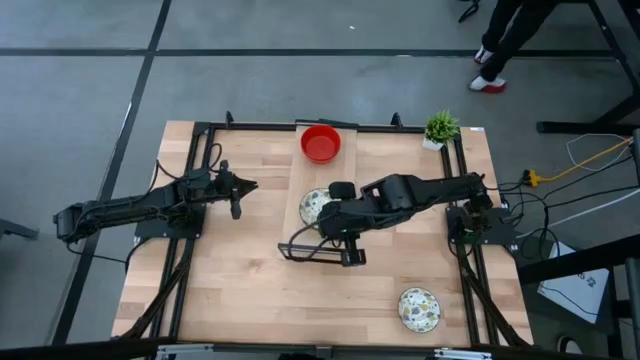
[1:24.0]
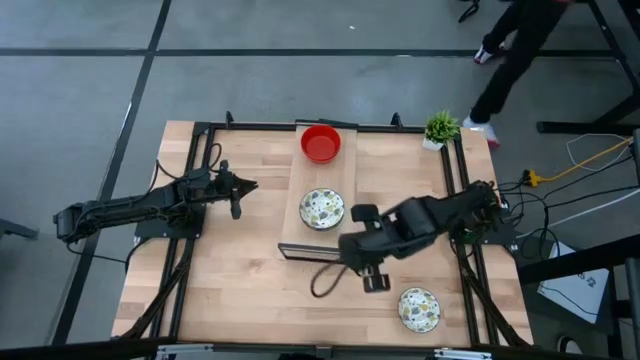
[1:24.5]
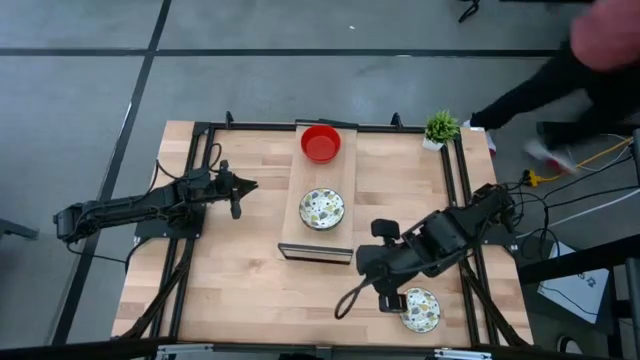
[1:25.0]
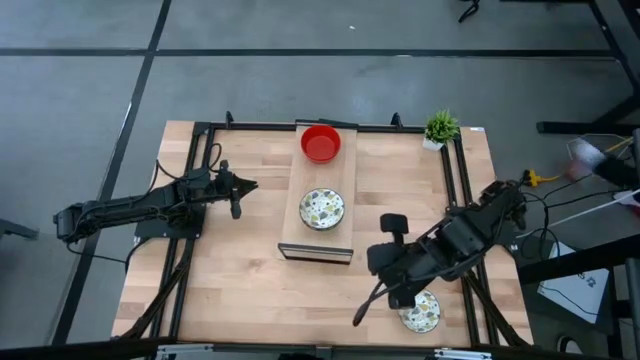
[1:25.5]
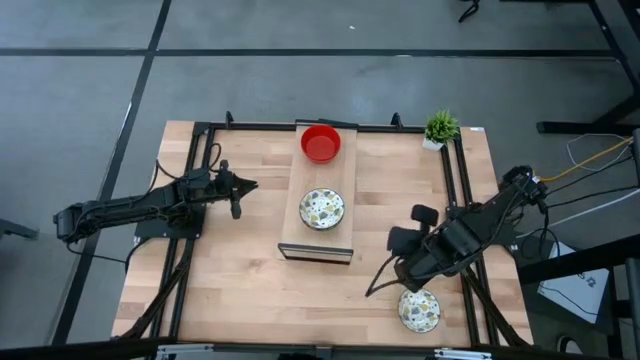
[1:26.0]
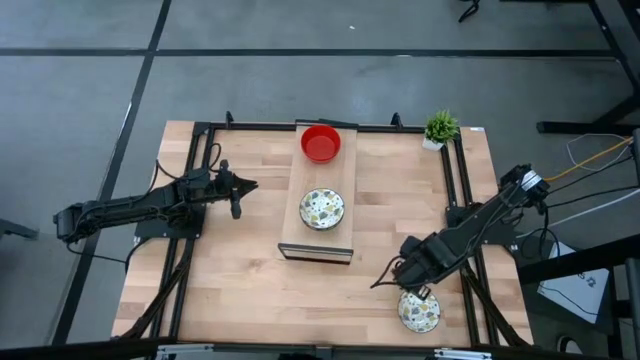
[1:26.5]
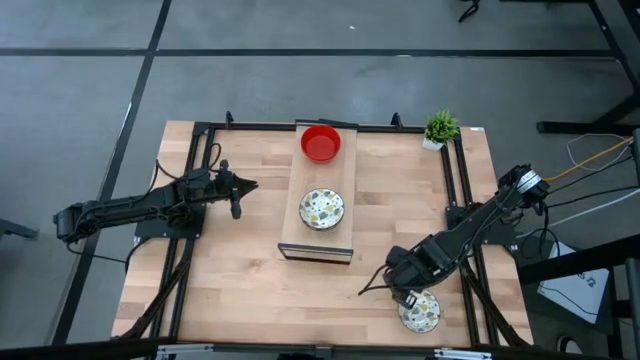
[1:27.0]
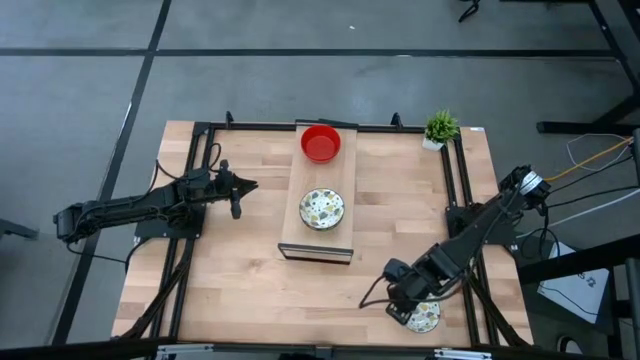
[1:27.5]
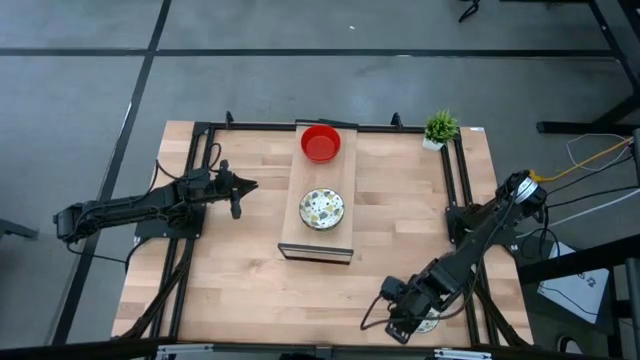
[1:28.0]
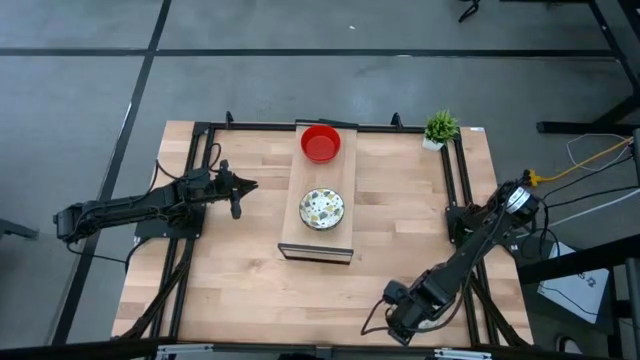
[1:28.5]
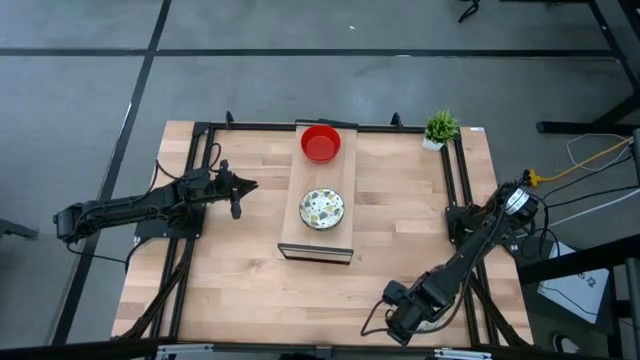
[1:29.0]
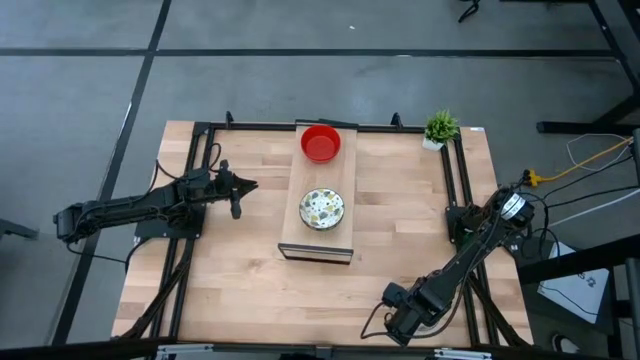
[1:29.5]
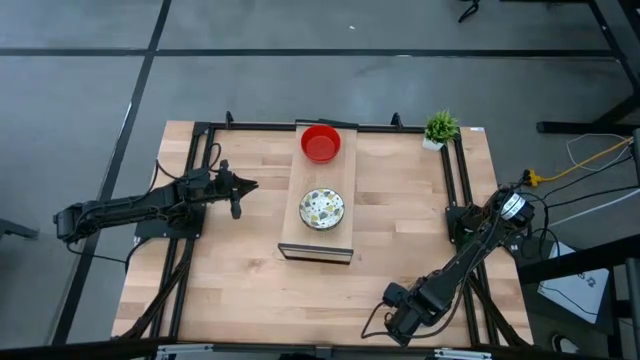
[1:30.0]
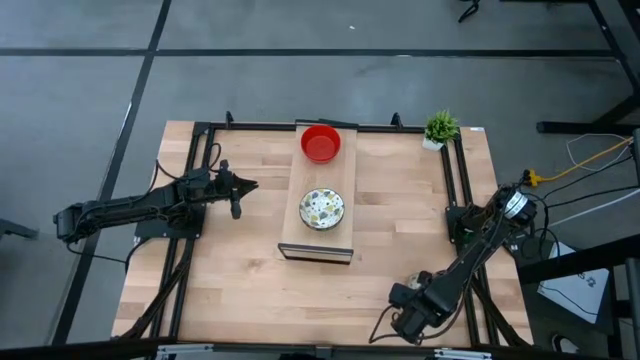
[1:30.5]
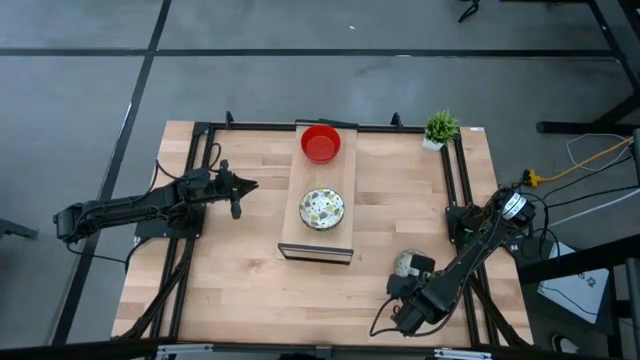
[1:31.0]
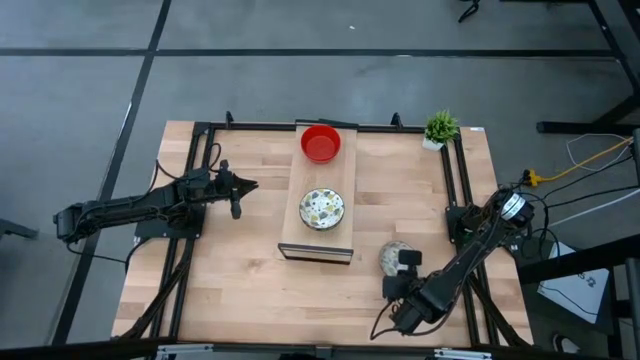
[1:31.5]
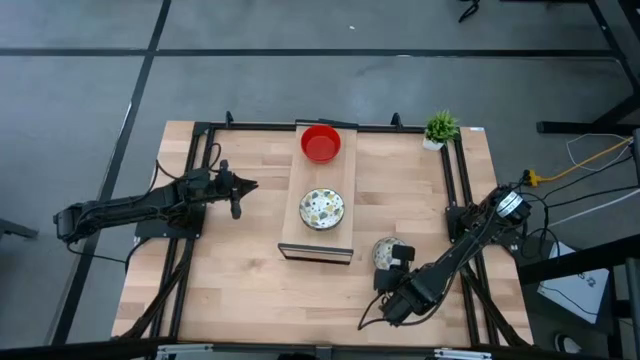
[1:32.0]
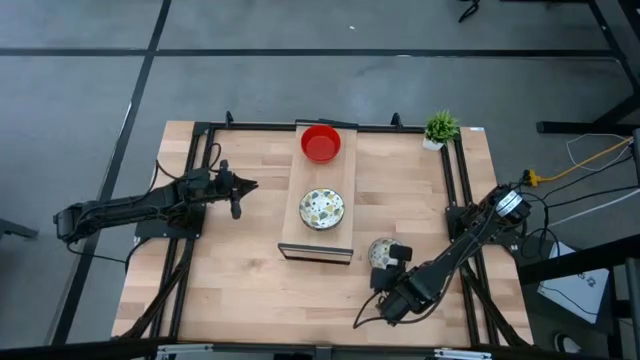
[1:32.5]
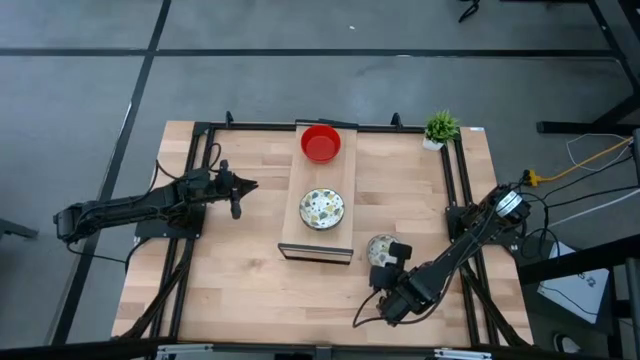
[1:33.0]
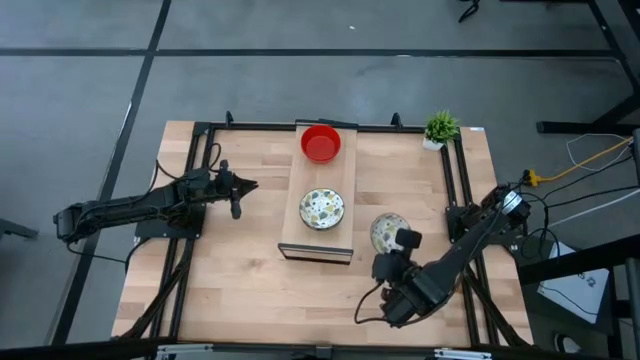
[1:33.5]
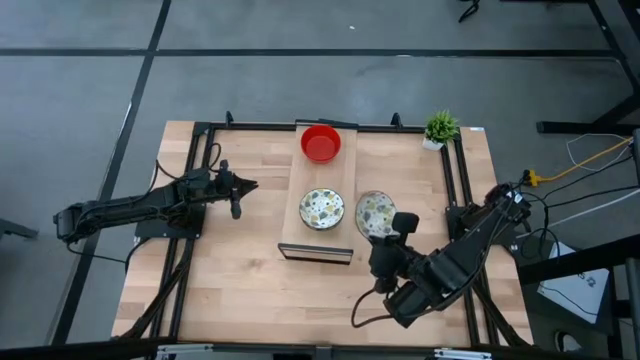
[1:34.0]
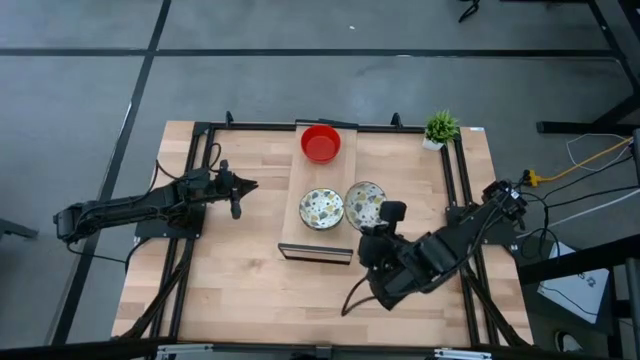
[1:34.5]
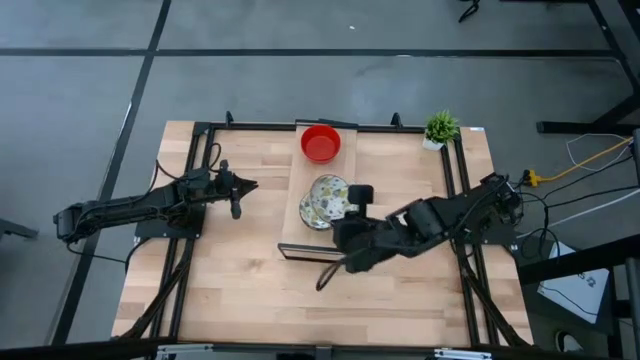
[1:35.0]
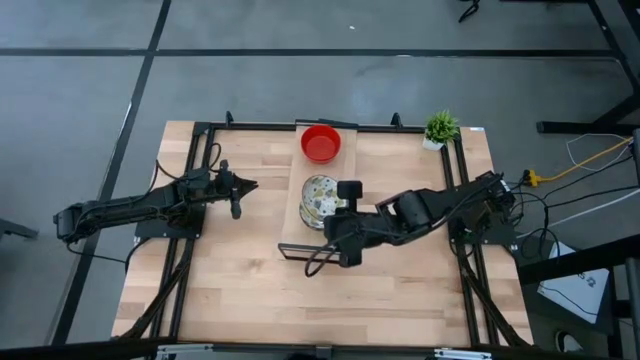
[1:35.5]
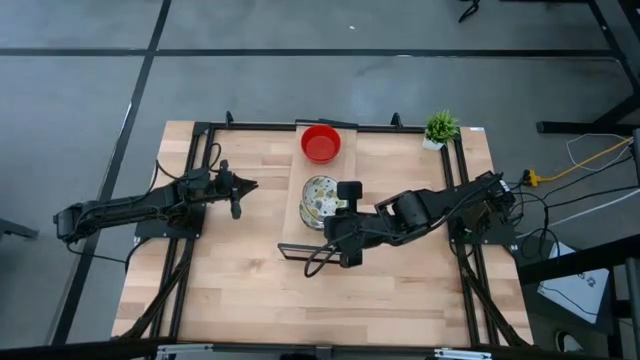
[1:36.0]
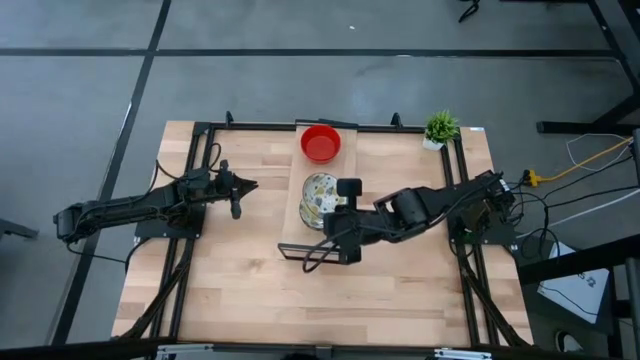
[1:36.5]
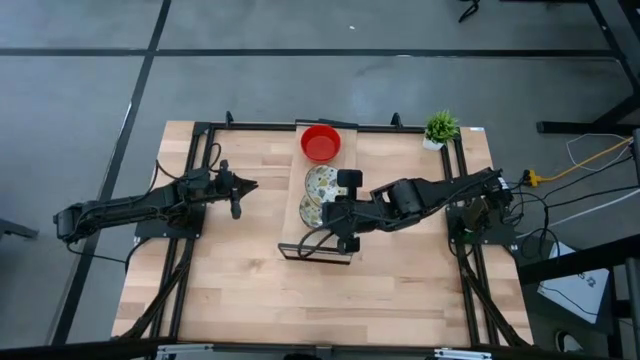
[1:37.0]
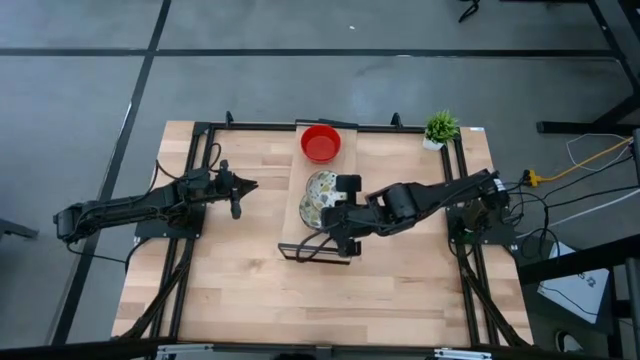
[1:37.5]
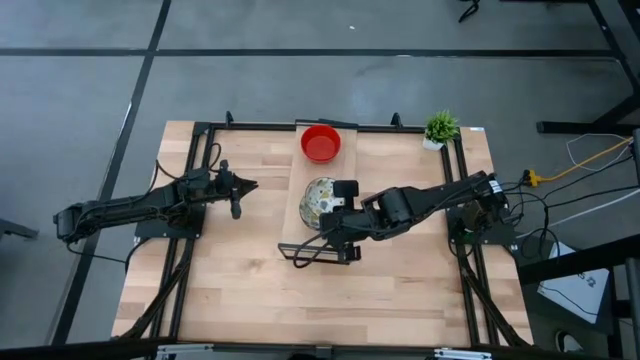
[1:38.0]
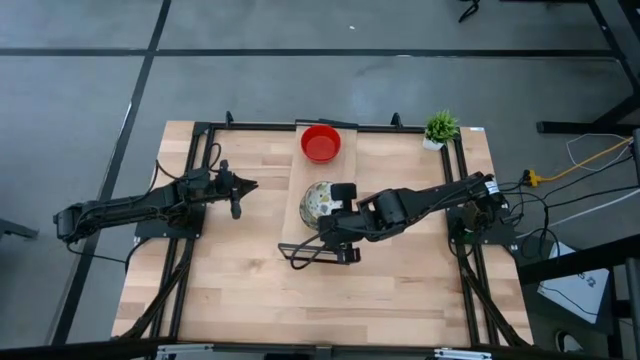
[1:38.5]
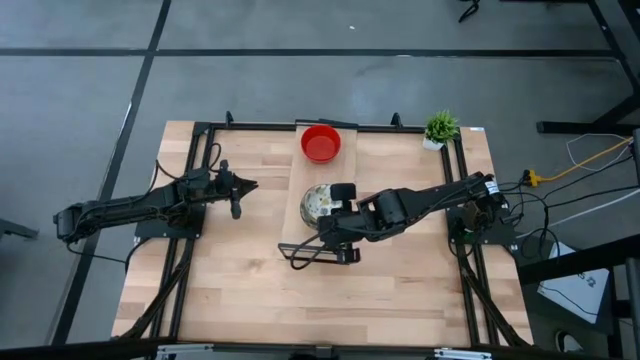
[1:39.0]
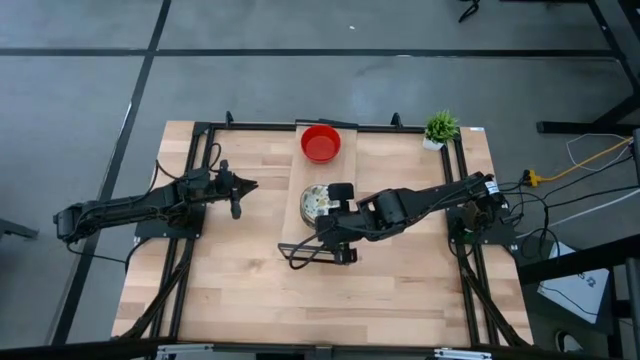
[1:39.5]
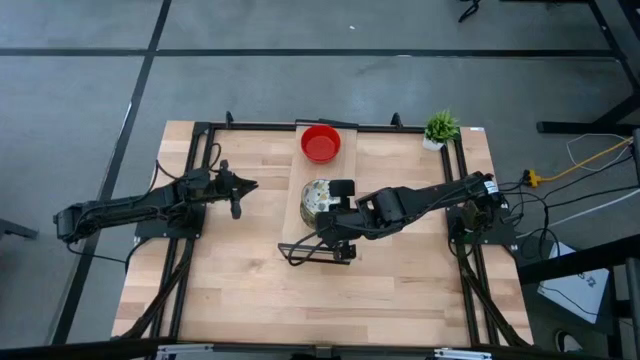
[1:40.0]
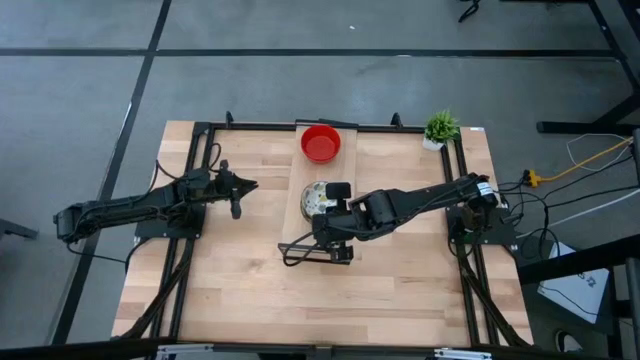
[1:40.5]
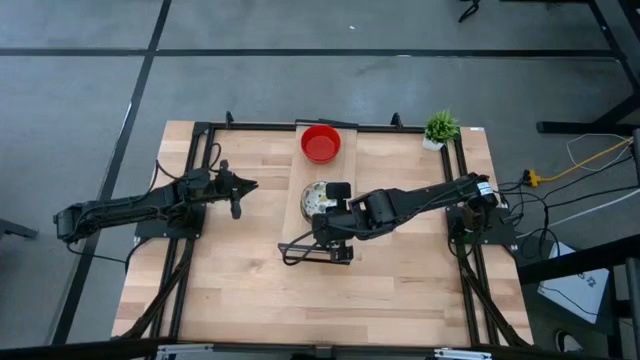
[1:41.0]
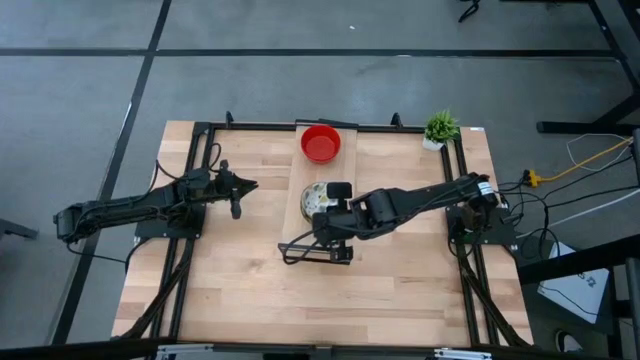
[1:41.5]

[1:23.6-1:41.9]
Task: Pick & Place Mini bowls
Stack the white bowl on top of the white bowls on the shelf

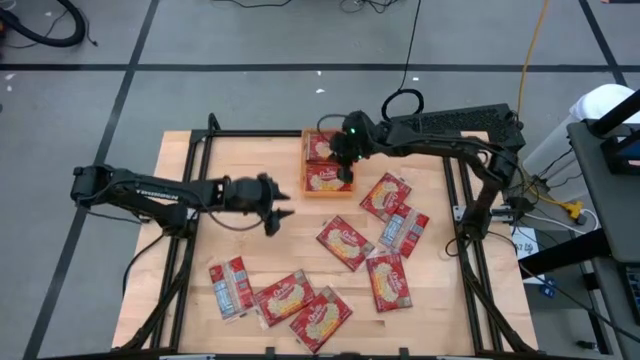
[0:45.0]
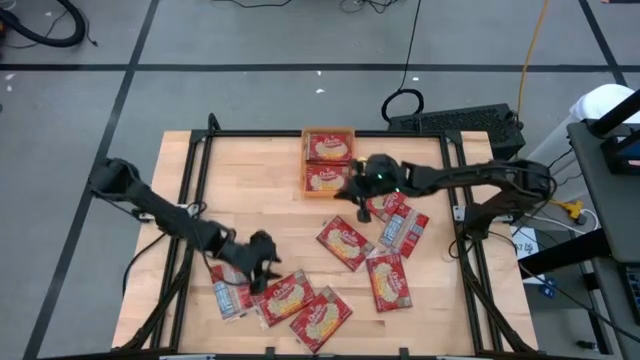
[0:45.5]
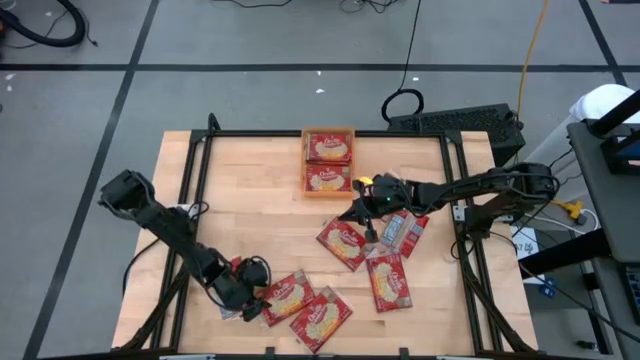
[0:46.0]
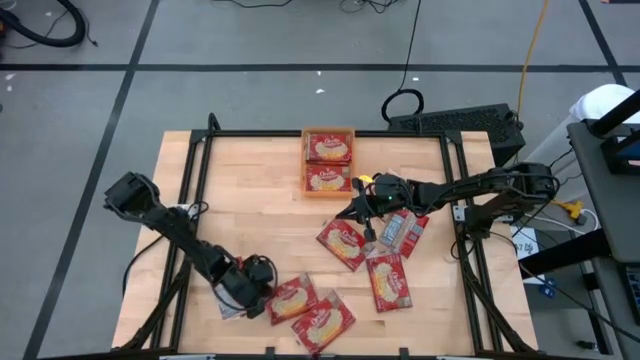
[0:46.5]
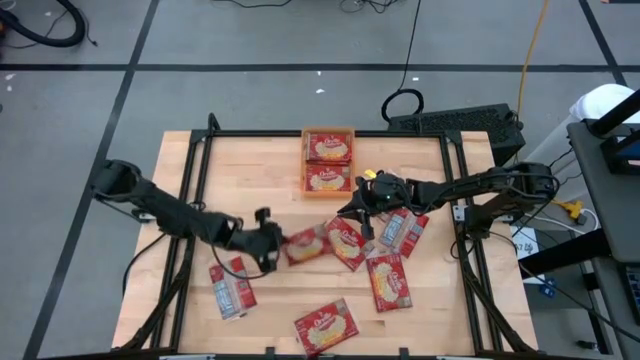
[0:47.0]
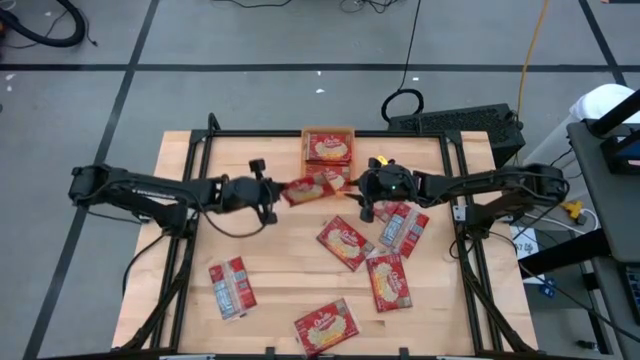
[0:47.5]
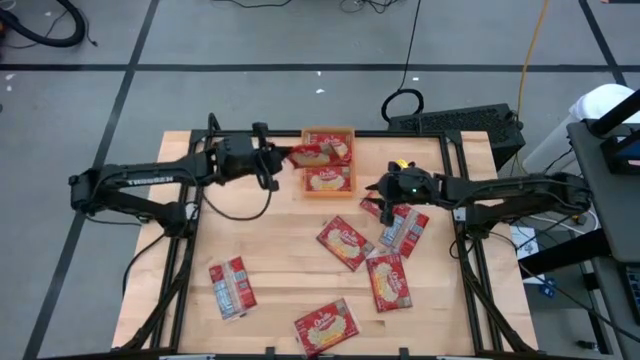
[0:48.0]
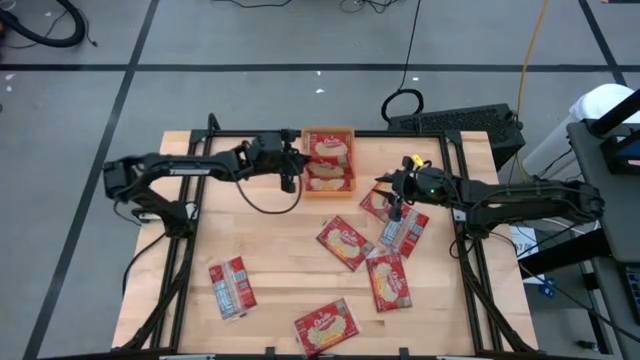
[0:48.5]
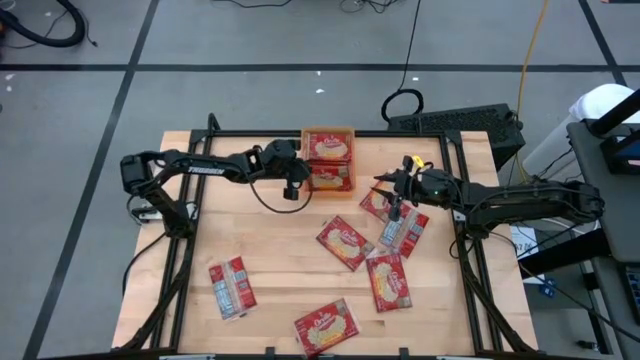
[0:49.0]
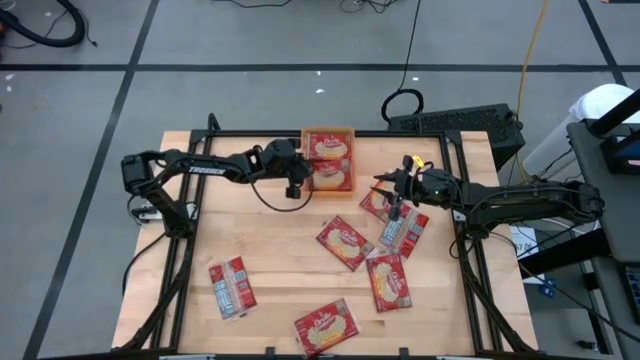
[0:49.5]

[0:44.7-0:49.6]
Task: Sort popcorn bags into baskets
Put the red popcorn bag into the orange bin
